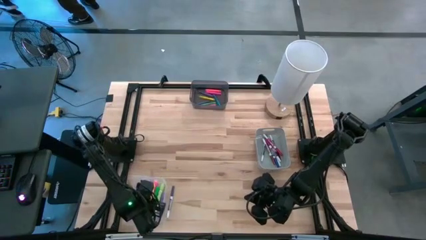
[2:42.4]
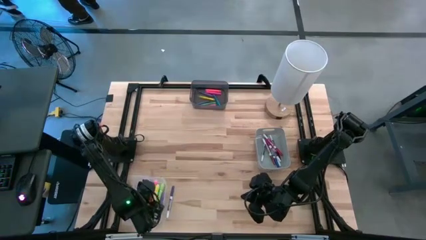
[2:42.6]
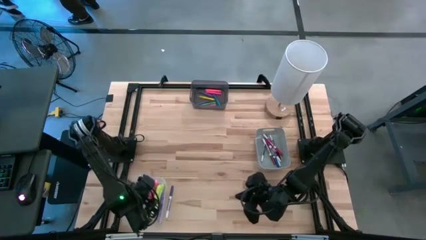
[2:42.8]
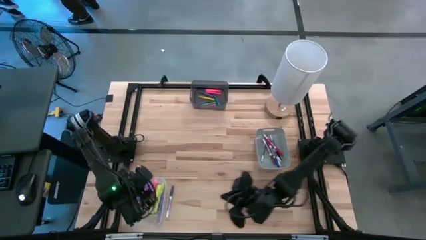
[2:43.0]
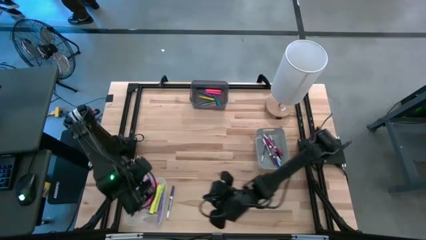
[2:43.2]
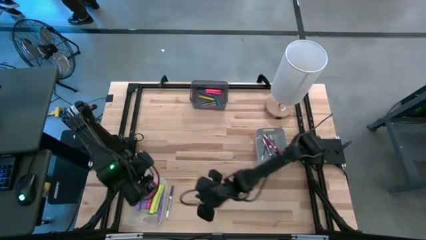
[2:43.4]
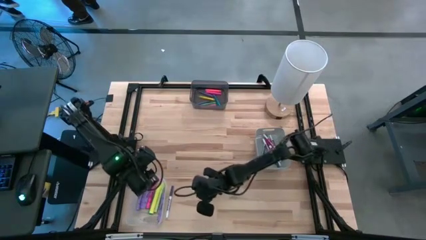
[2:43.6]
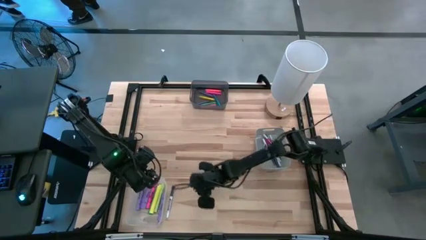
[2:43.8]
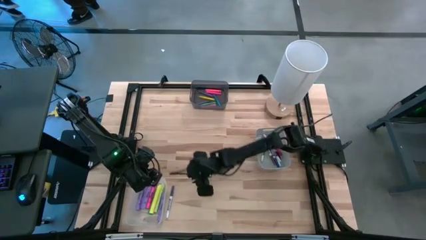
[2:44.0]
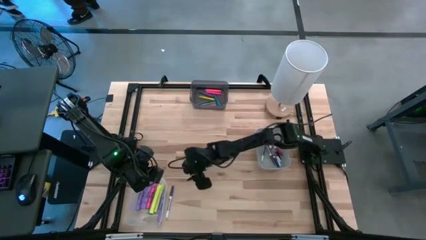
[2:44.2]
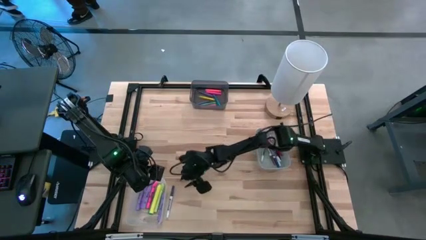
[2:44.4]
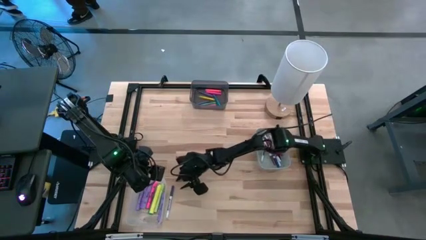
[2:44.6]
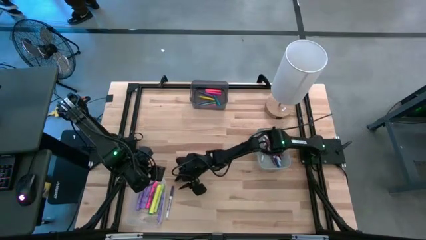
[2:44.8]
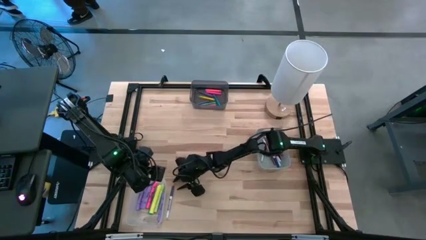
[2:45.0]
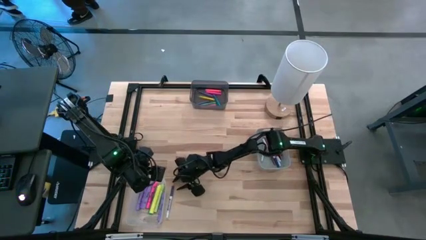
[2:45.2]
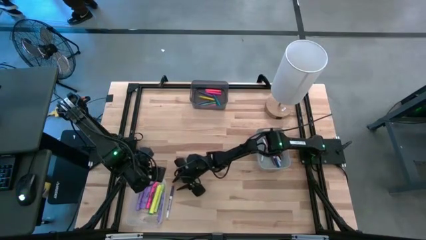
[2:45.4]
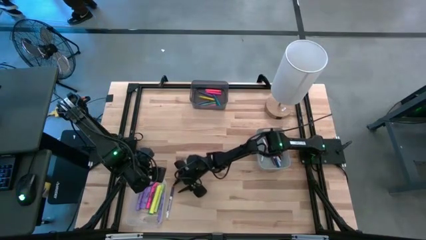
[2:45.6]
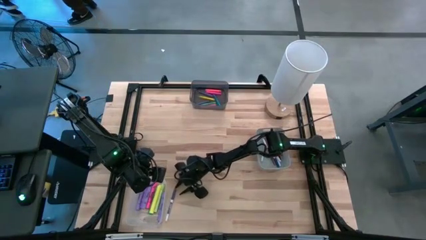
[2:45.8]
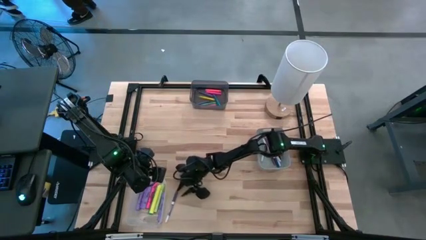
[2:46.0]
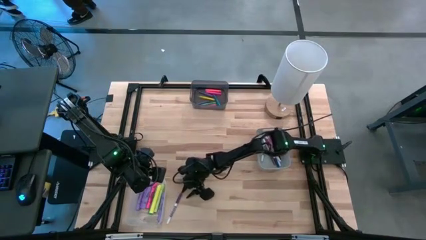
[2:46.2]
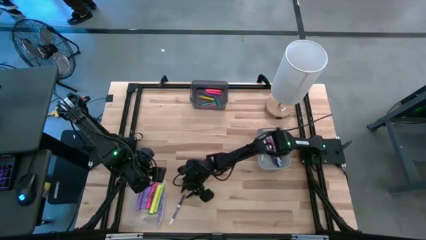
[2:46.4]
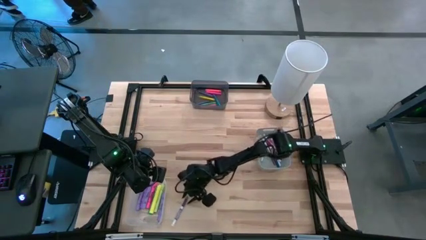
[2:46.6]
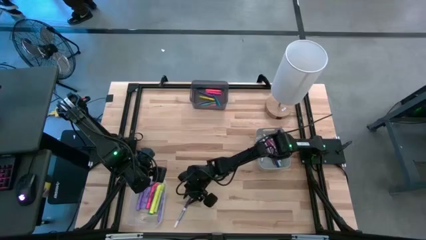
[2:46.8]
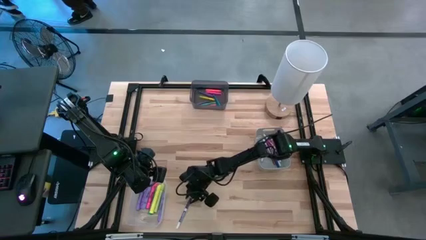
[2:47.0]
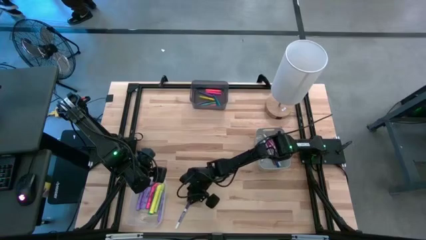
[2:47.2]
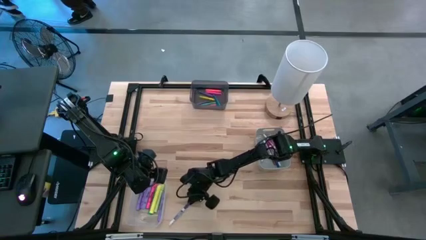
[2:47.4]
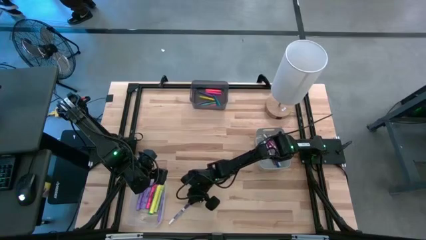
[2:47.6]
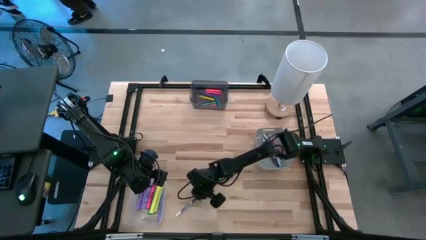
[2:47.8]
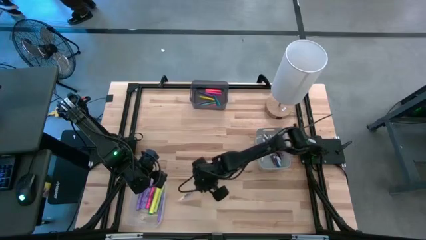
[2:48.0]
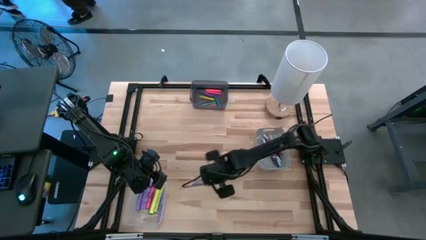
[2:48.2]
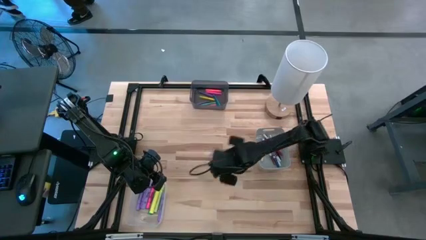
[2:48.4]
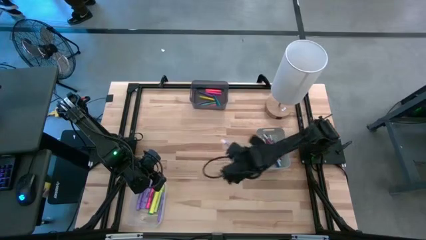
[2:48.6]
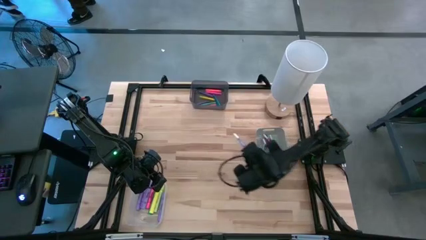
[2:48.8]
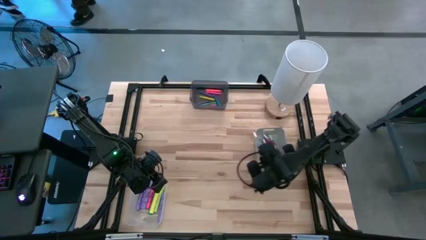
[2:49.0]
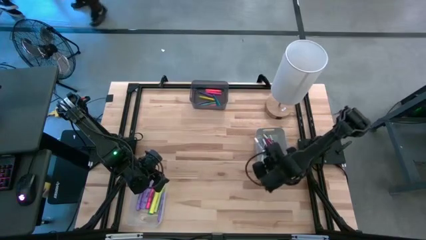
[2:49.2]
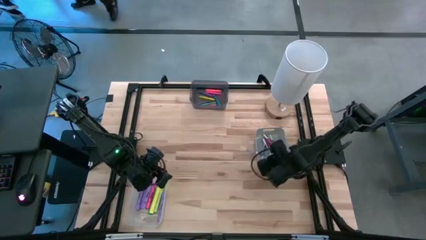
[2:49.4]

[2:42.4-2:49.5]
Task: Pick & Place Markers
Put the blue marker pen into the gray bin

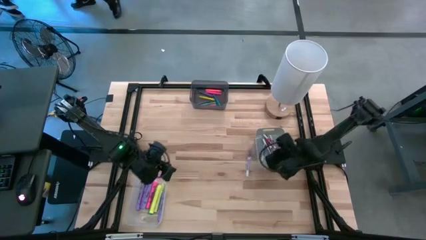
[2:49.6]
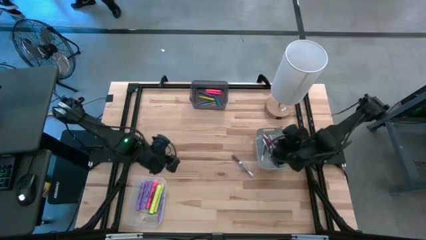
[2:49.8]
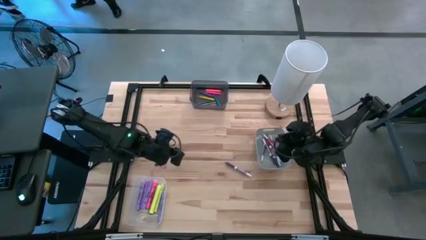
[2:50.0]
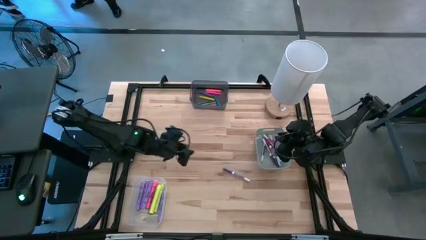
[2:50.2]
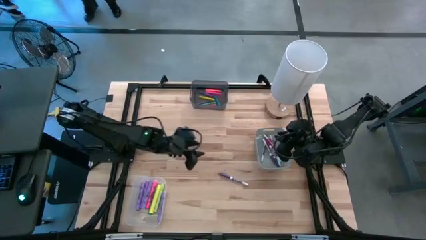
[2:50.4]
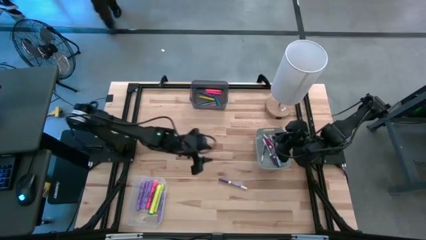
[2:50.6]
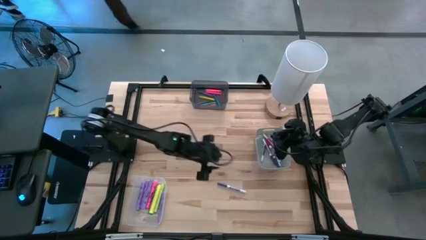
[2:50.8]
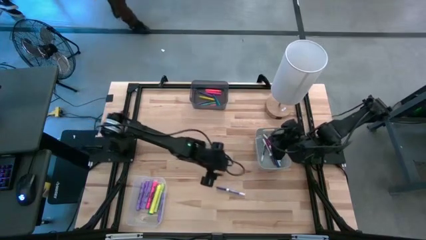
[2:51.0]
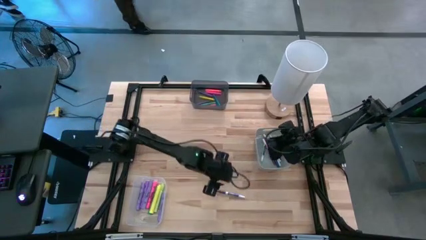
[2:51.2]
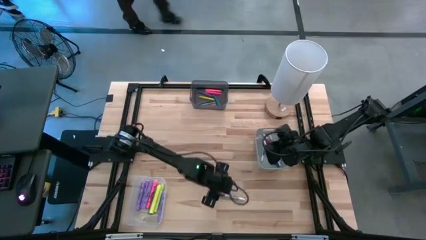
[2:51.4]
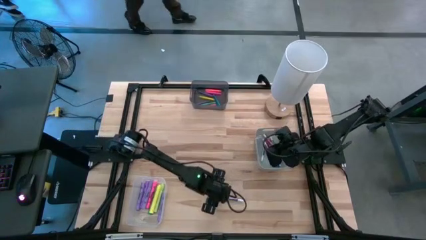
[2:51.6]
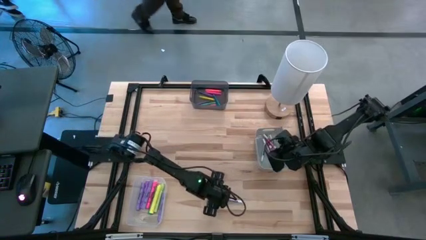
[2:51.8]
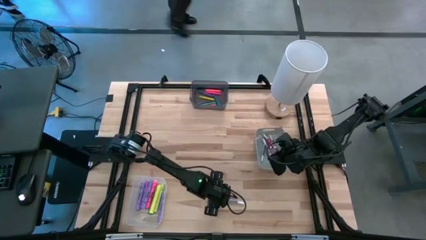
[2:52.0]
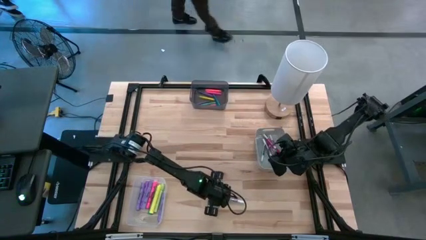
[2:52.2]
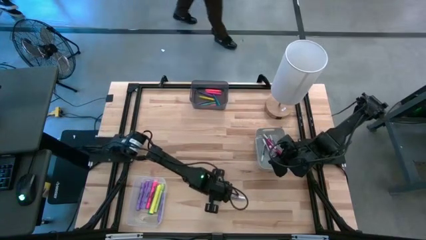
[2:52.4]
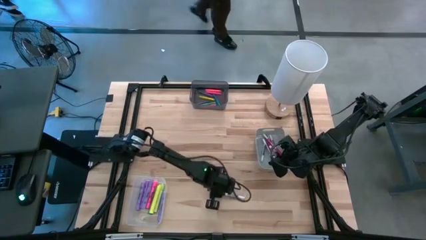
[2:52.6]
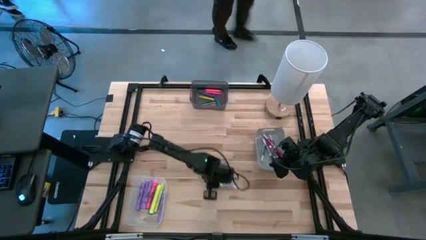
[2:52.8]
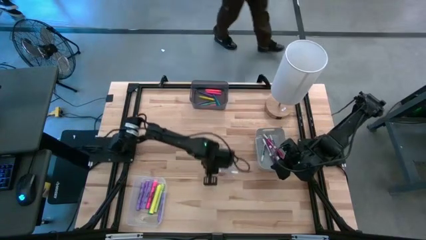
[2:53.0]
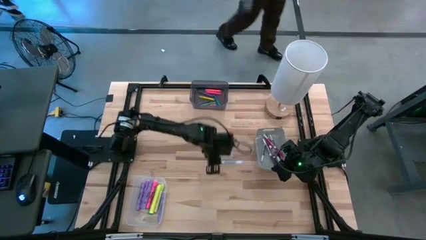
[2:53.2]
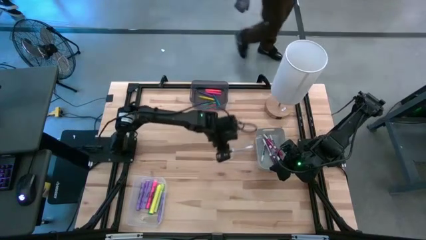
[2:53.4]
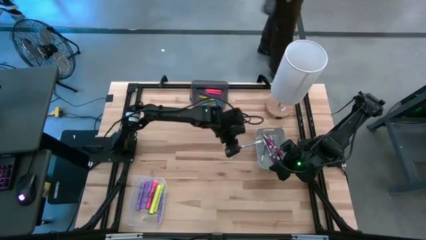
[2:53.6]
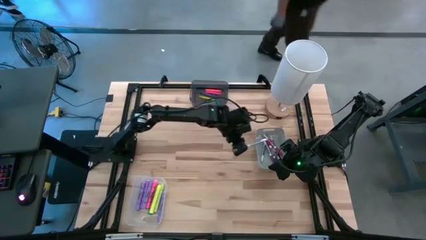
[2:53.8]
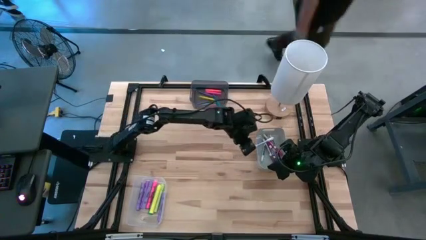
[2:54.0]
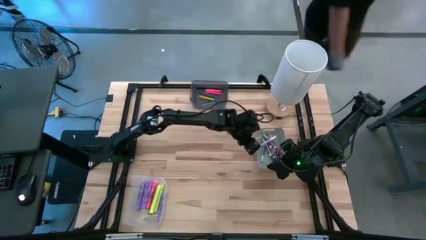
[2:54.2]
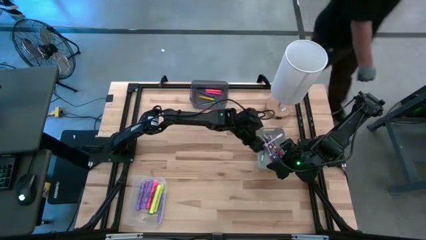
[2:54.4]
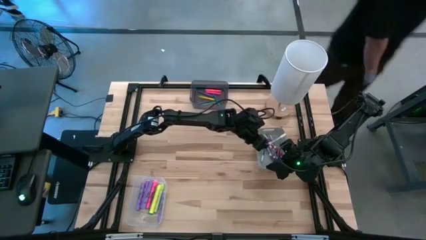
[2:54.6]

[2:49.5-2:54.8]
Put the blue marker pen into the gray bin

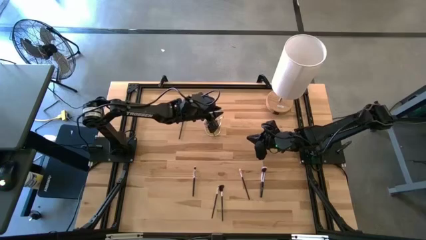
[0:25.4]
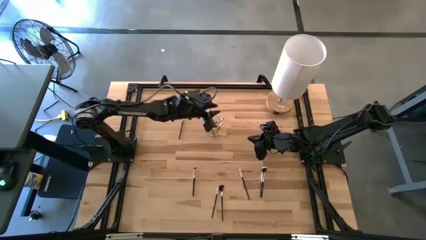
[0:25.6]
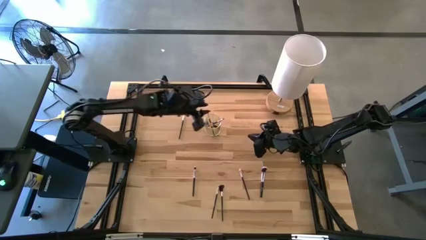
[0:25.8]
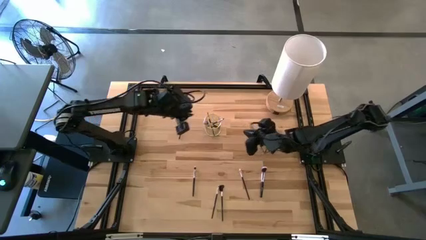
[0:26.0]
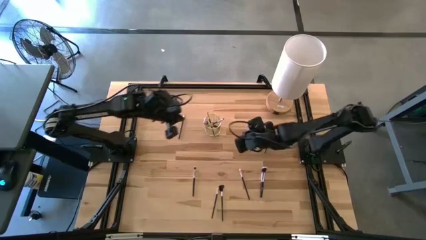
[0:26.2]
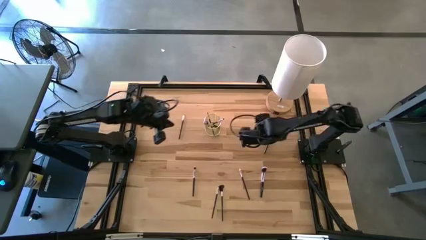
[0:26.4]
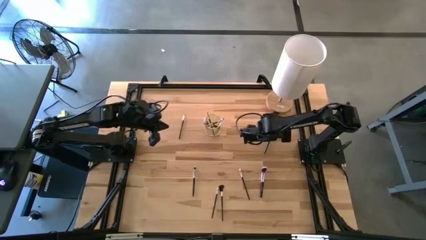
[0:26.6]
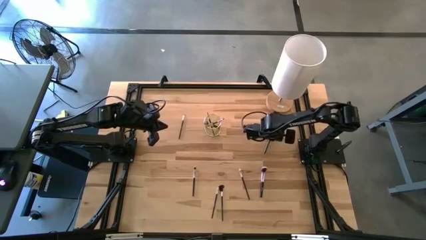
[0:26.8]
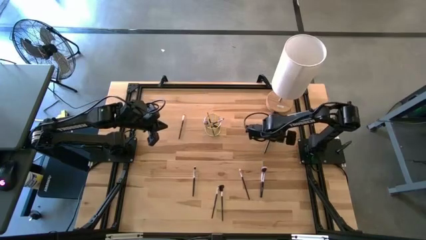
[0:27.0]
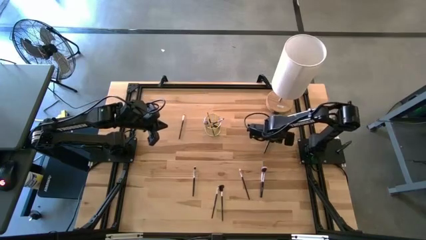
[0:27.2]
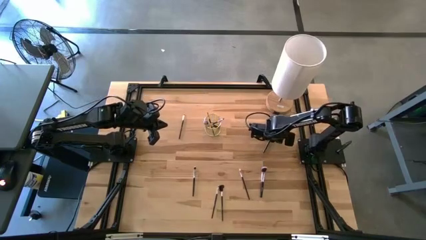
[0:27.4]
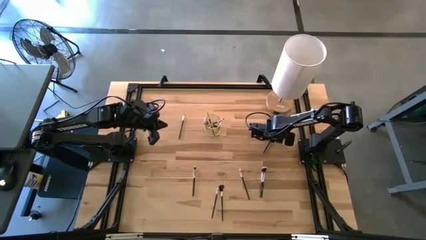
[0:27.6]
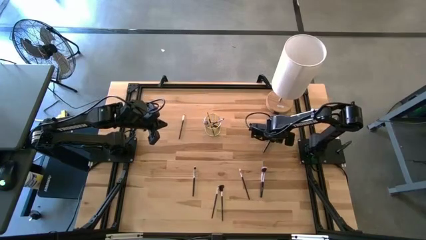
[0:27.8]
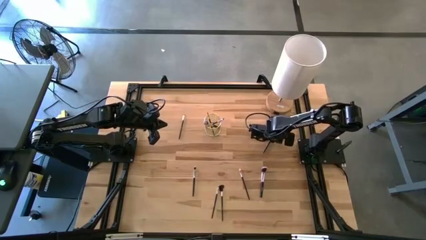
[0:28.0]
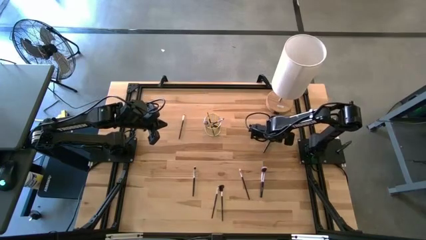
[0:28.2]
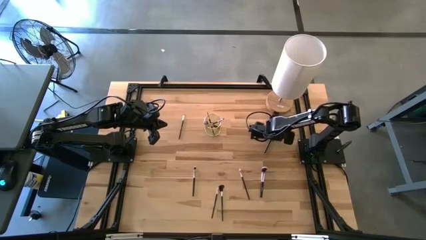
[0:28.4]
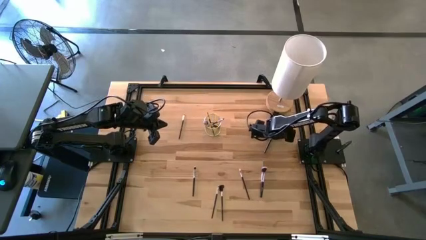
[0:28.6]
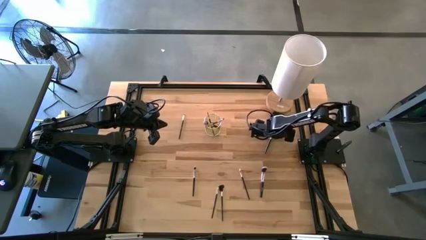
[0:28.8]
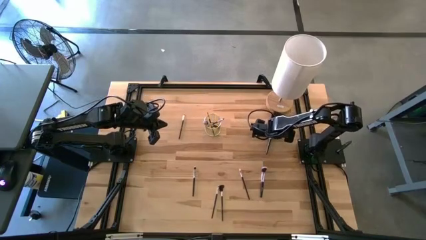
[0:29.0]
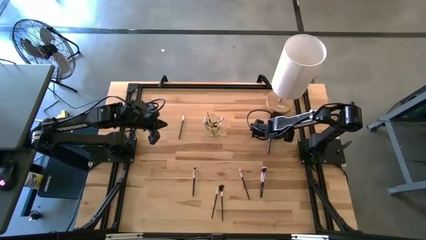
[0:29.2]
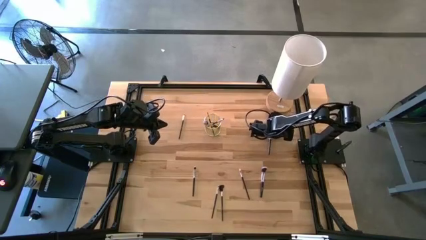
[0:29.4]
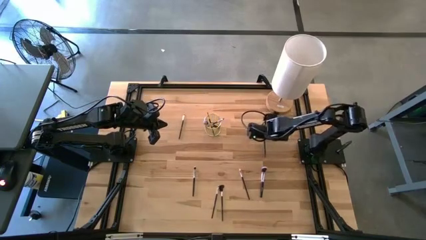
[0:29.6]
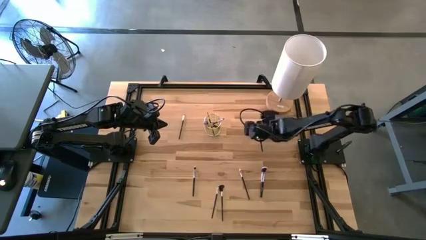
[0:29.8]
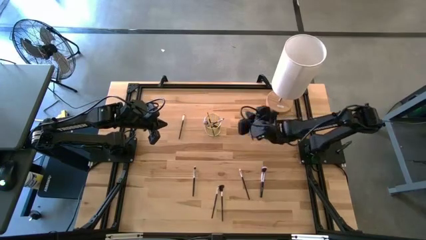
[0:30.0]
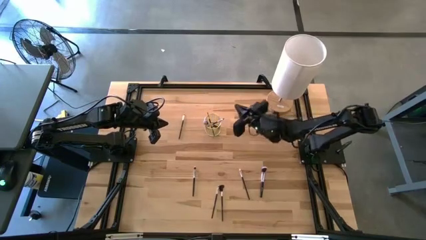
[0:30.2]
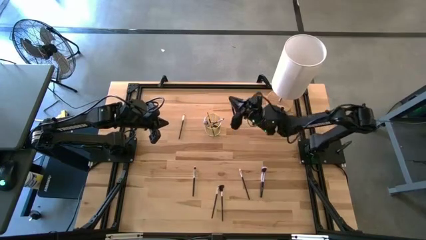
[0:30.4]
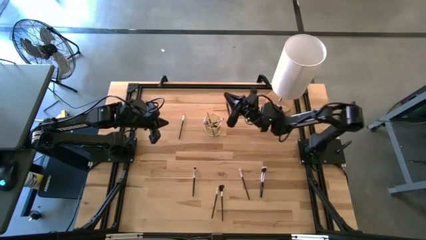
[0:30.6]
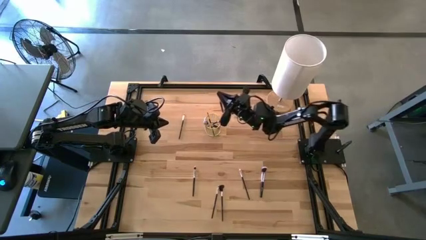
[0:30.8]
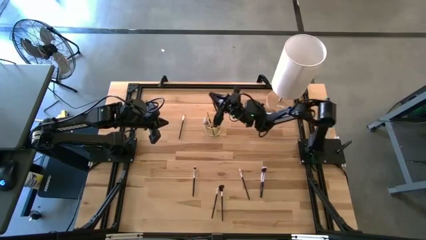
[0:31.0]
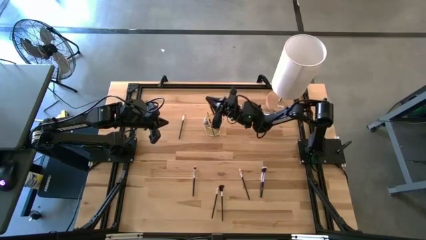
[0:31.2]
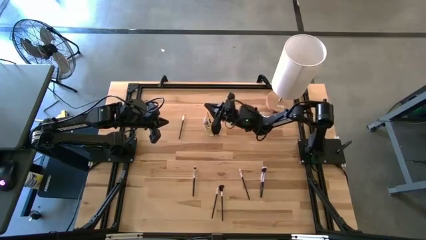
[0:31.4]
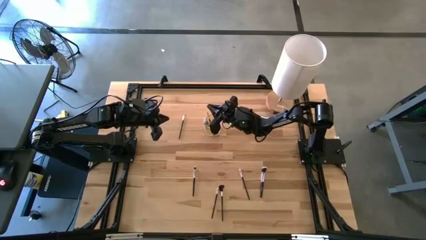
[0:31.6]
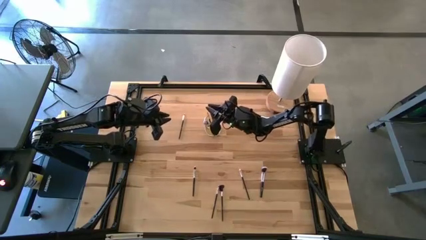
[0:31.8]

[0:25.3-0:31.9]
Task: Put items in baskets/containers
Put the black eyeshadow brush into the gold container
